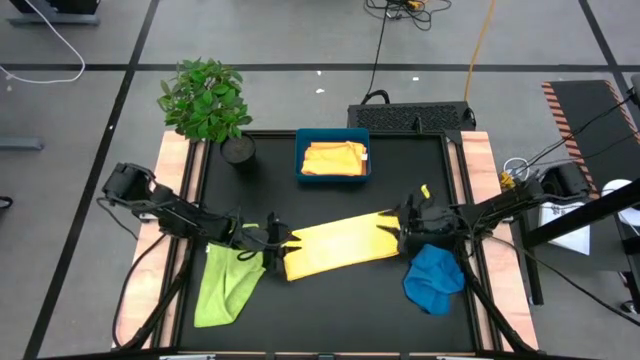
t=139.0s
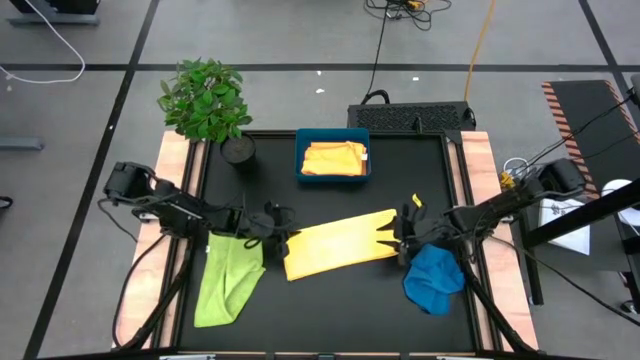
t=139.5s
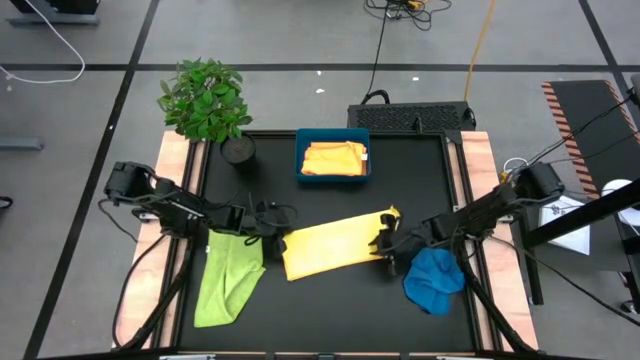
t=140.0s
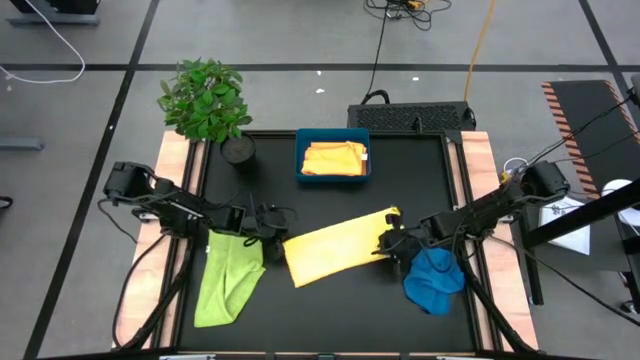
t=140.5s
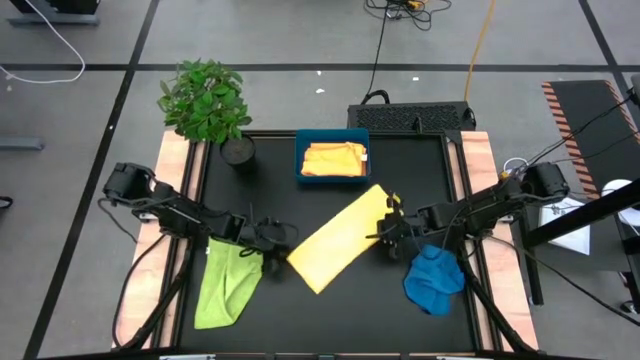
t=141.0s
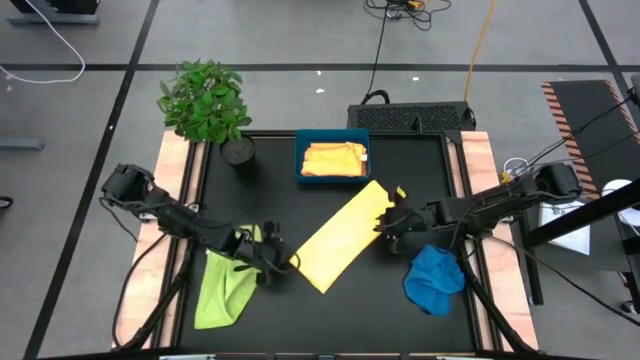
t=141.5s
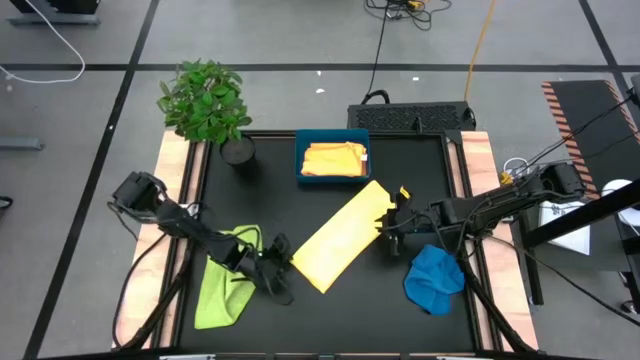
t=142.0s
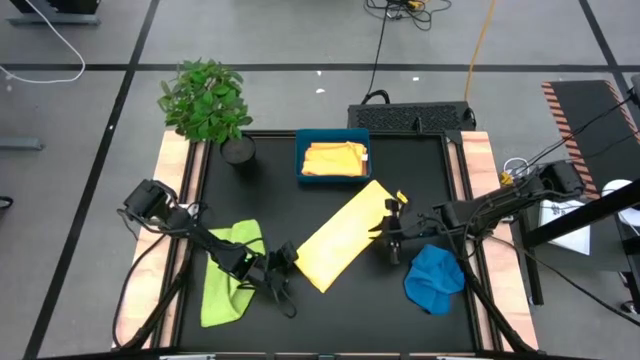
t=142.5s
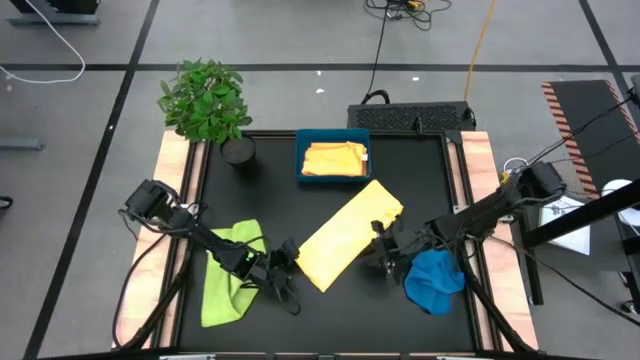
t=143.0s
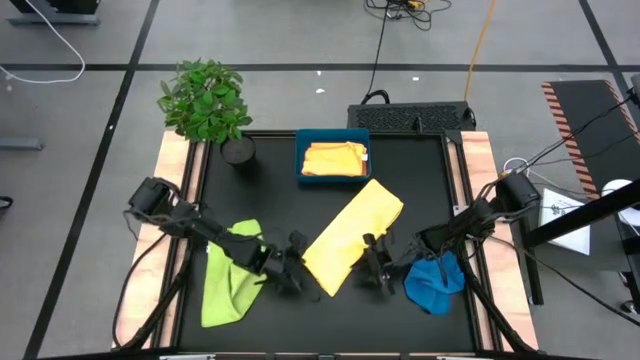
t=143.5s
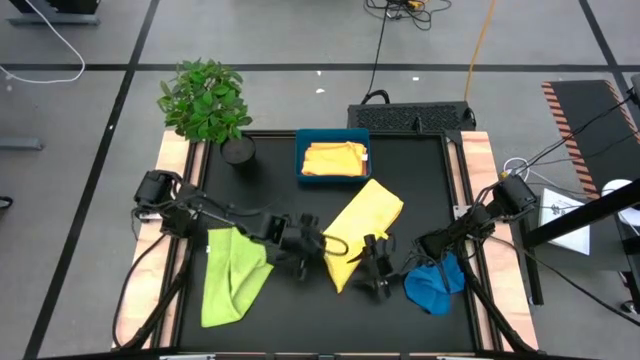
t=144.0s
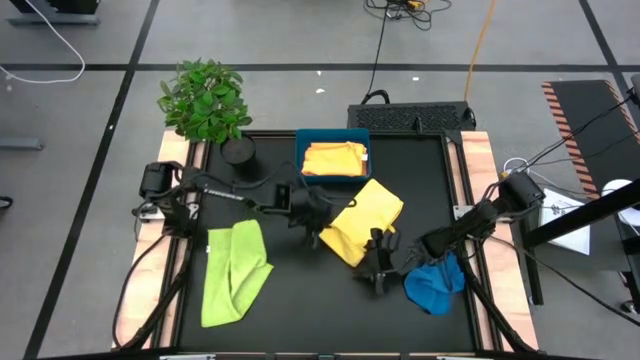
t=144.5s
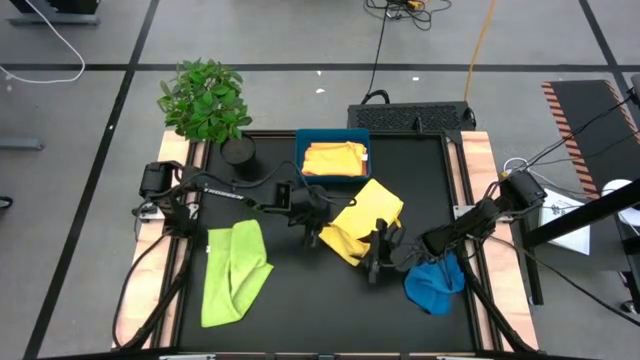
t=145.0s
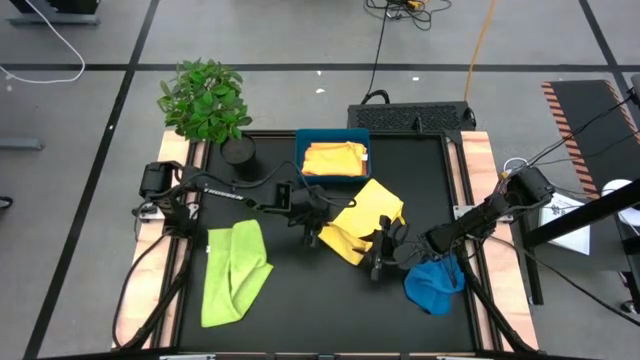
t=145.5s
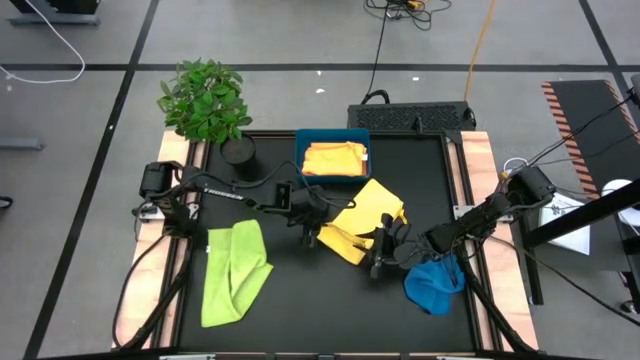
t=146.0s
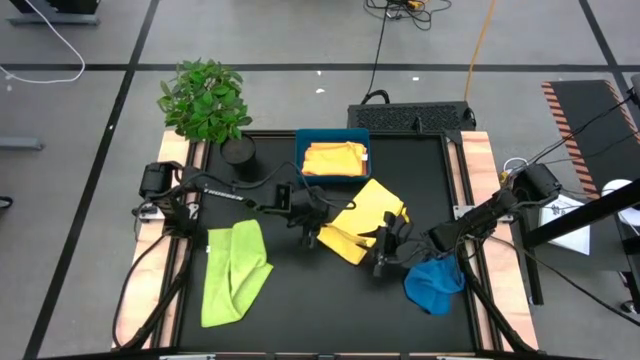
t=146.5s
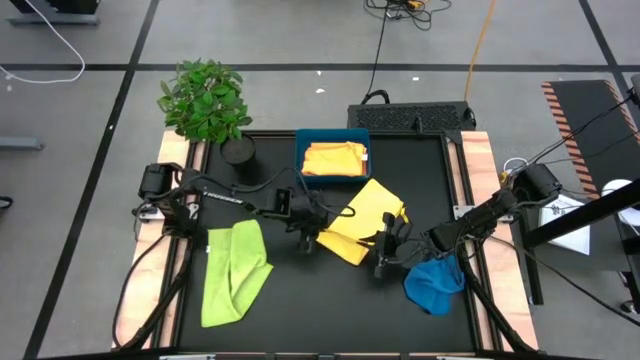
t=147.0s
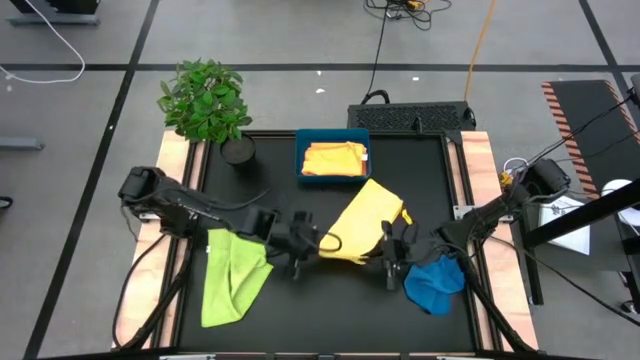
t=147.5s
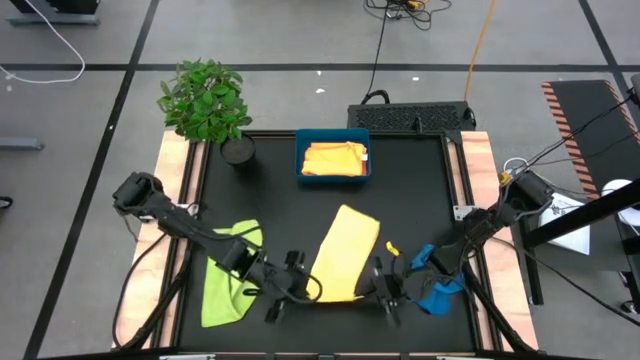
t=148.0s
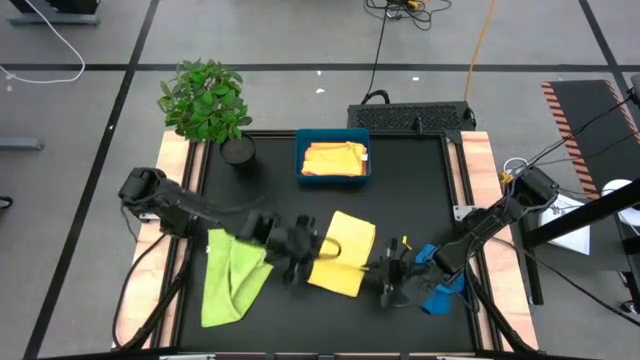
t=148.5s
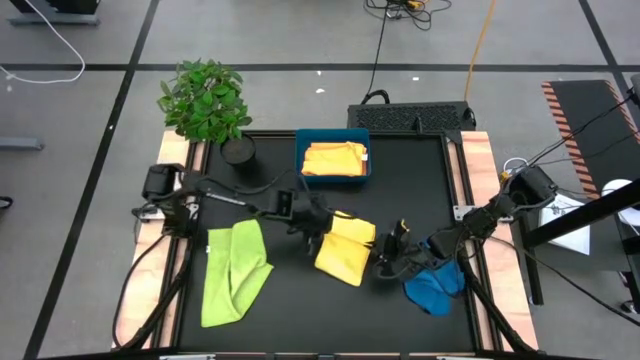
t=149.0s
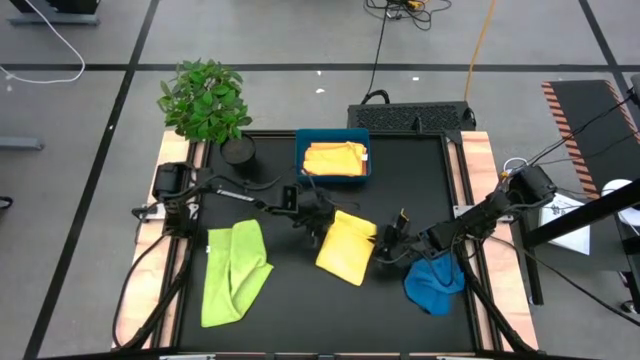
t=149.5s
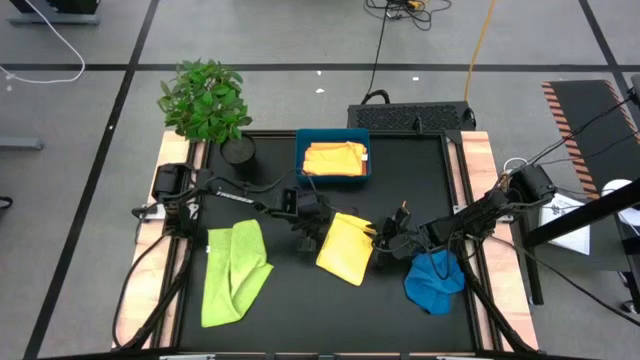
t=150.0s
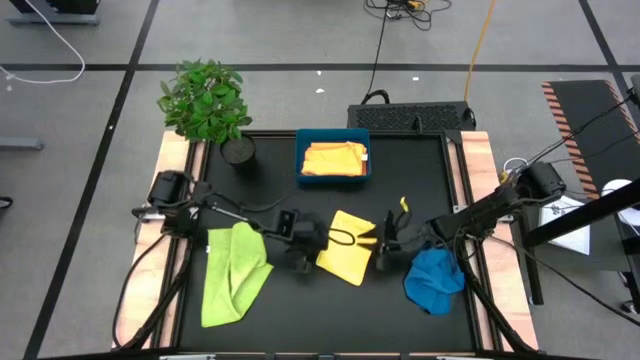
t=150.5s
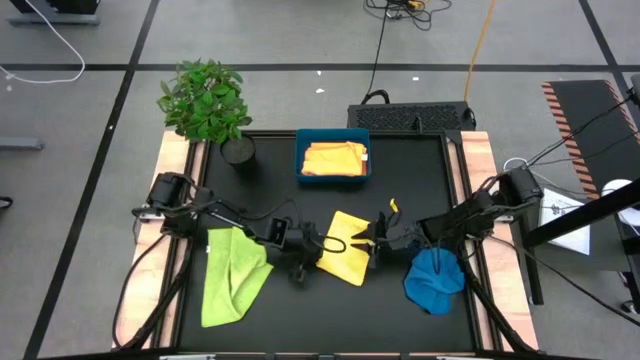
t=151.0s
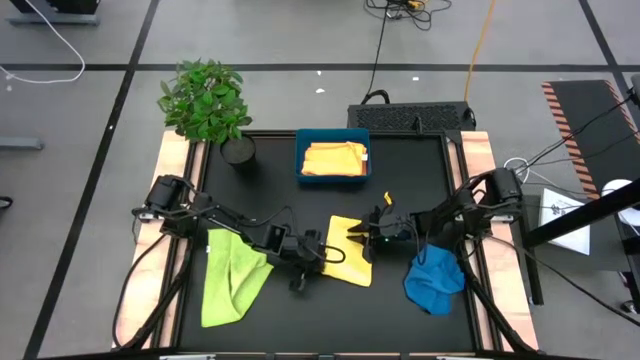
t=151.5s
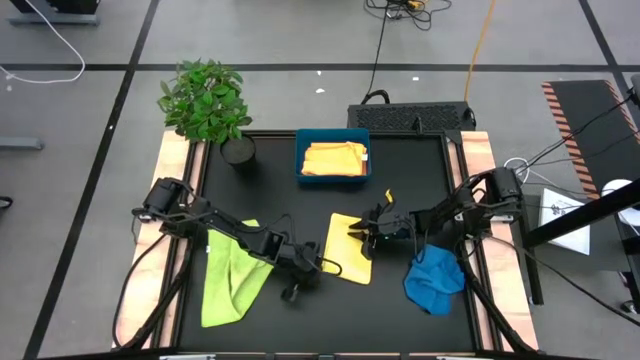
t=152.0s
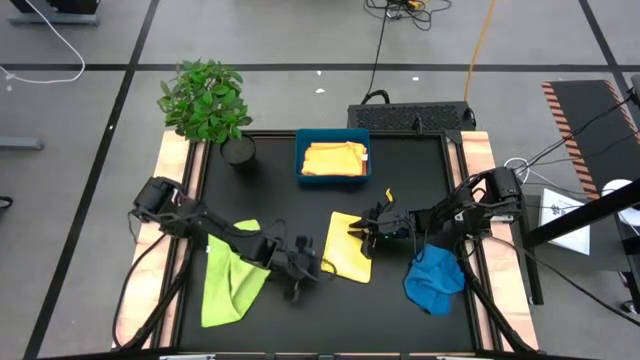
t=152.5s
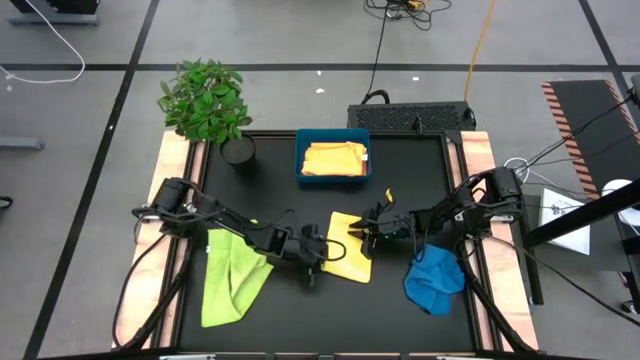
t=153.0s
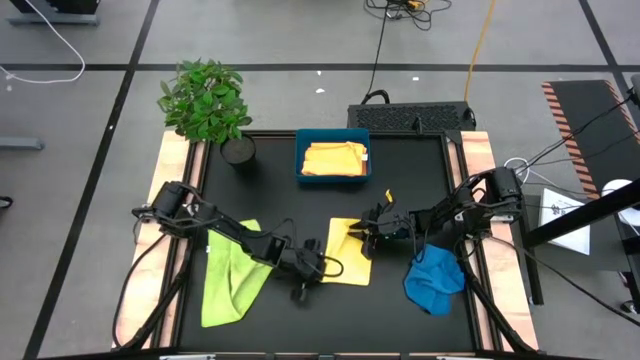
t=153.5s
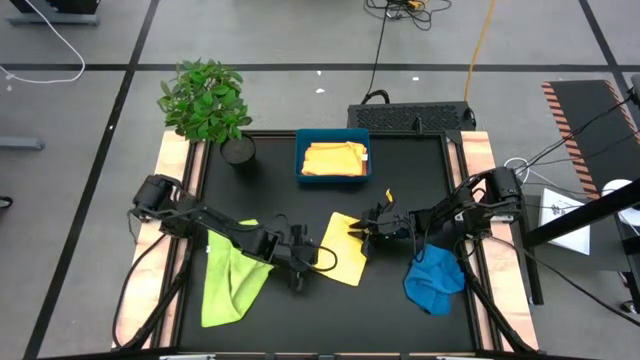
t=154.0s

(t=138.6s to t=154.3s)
Task: Fold microfiber towels
Fold the yellow microfiber towel

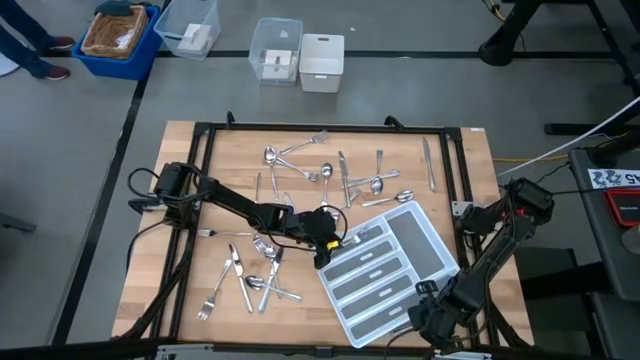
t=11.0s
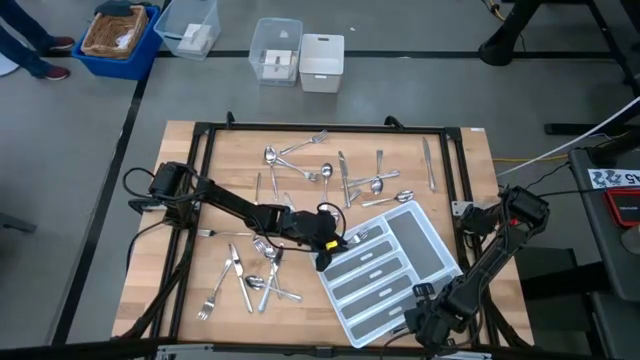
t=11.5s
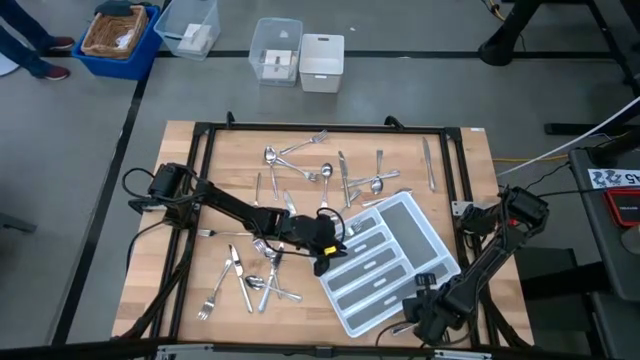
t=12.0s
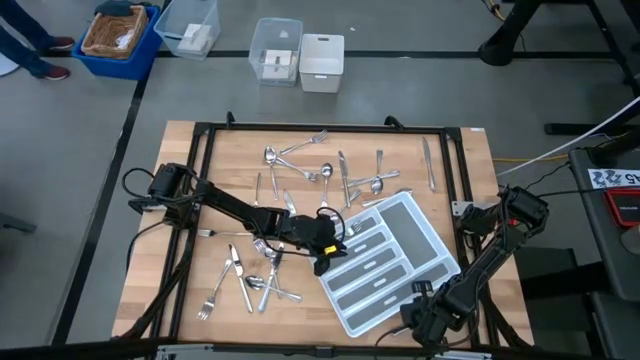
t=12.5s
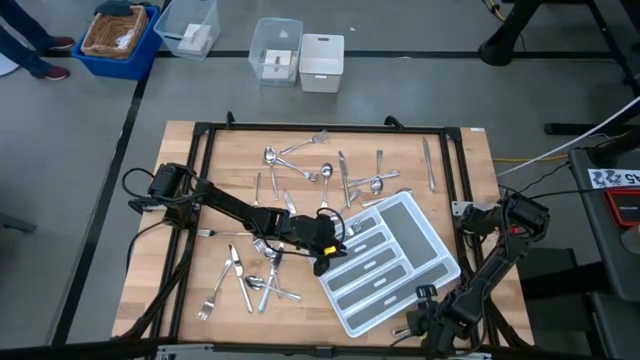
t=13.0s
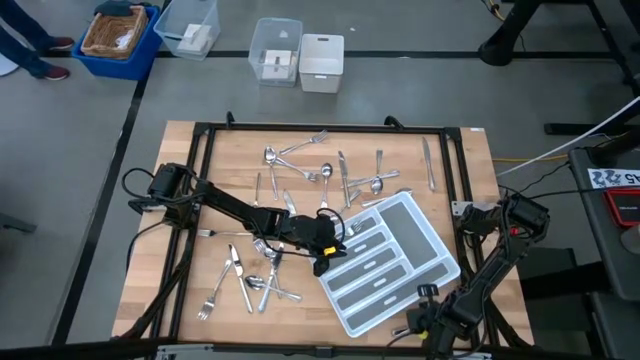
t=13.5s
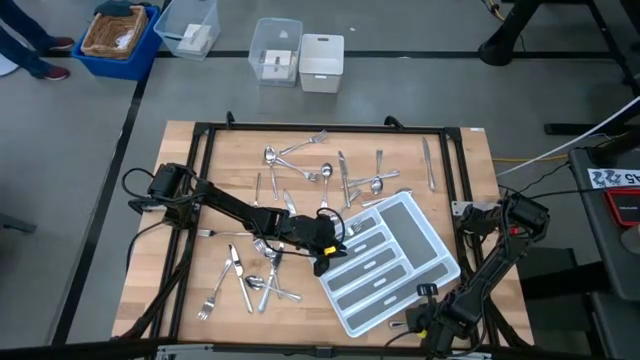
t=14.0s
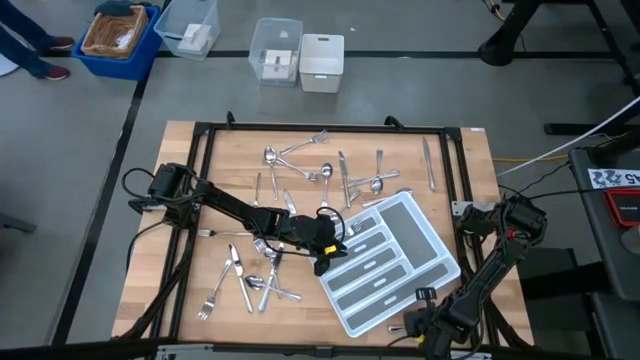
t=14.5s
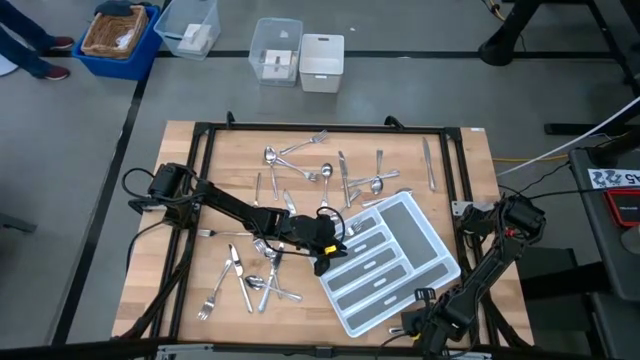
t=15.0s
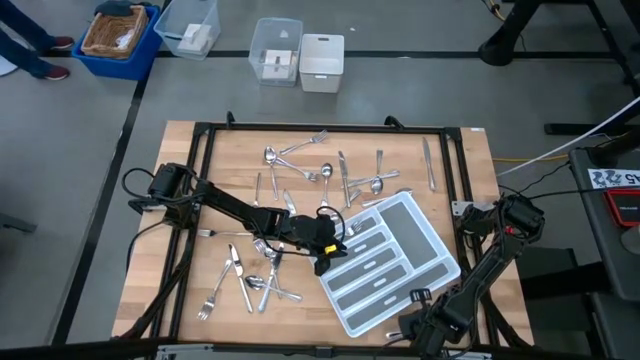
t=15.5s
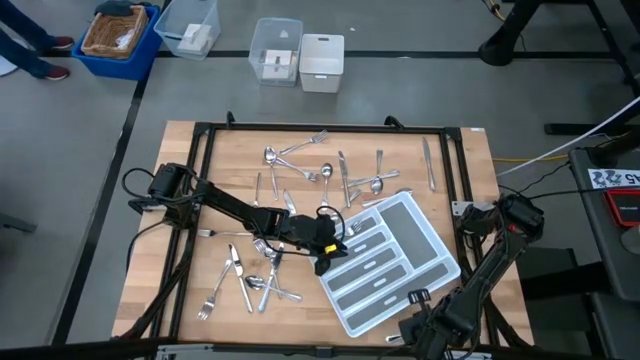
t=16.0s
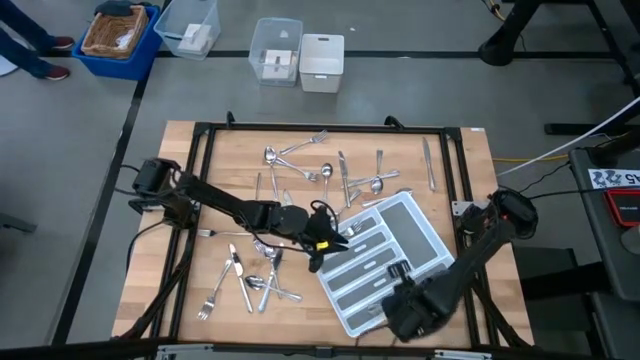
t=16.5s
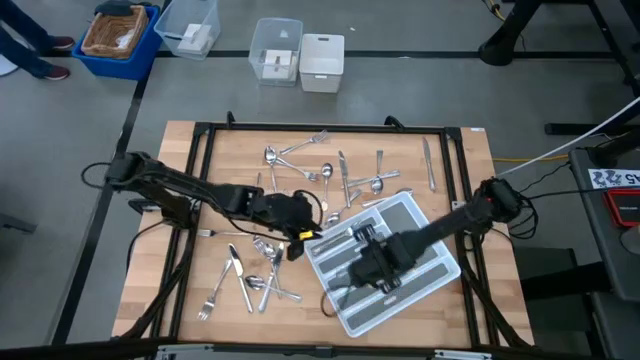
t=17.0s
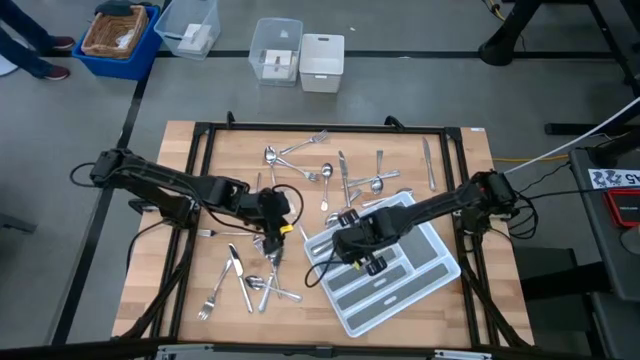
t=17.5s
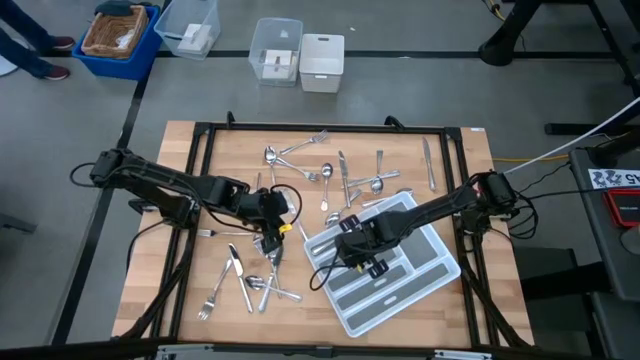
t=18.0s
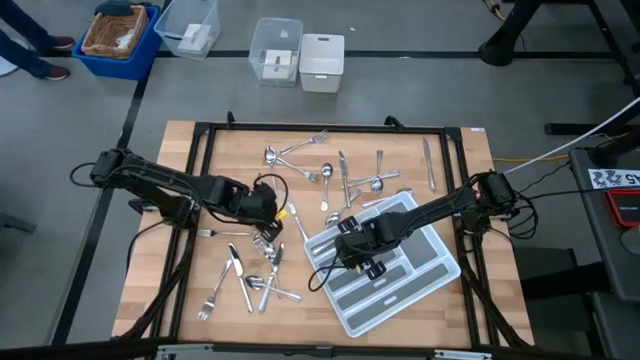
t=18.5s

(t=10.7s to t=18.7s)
Task: Sort silverware
Put the silver table knife into the silverware tray
